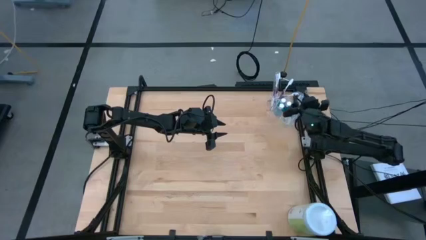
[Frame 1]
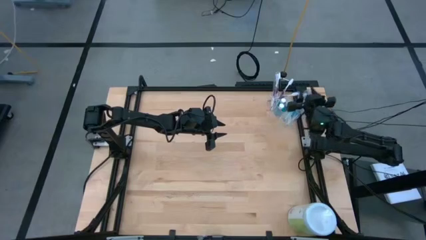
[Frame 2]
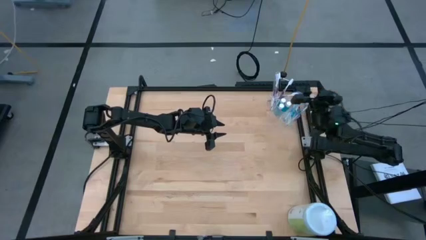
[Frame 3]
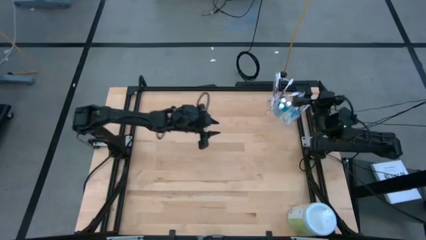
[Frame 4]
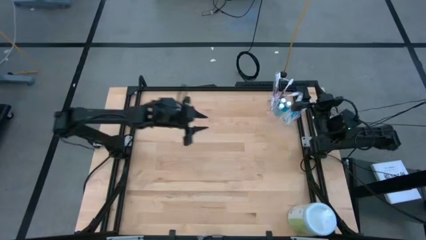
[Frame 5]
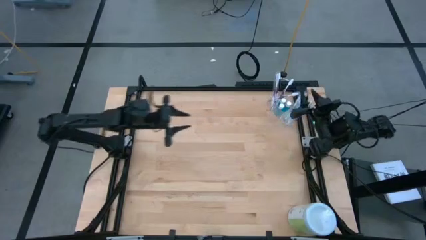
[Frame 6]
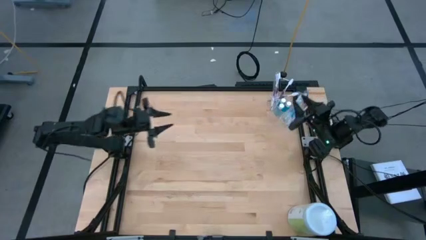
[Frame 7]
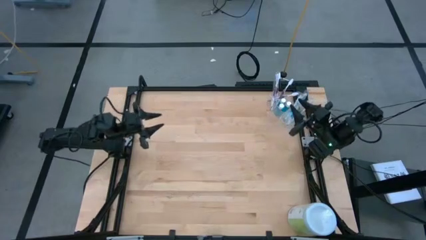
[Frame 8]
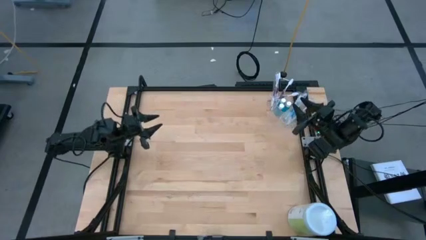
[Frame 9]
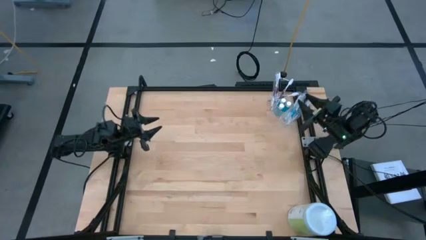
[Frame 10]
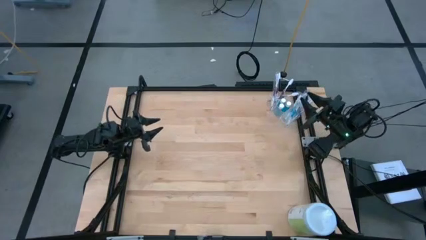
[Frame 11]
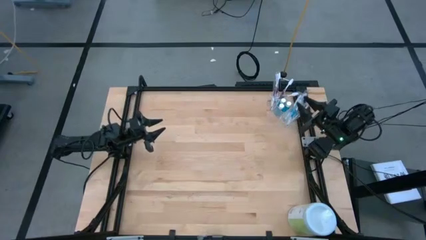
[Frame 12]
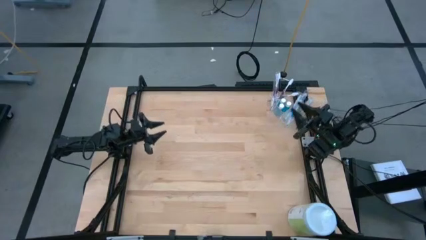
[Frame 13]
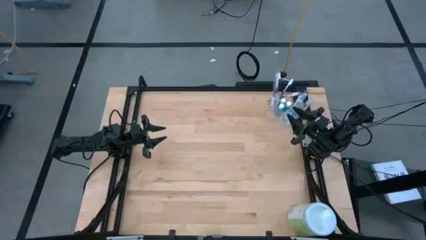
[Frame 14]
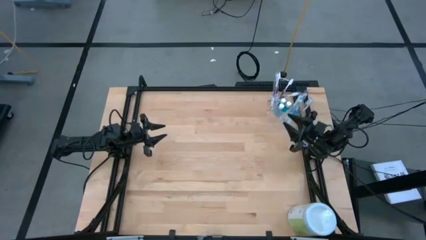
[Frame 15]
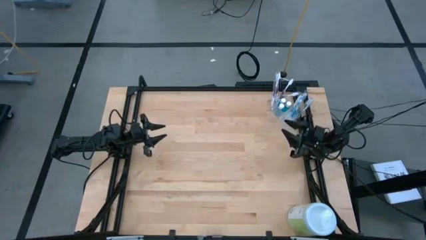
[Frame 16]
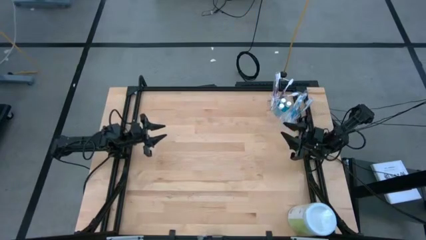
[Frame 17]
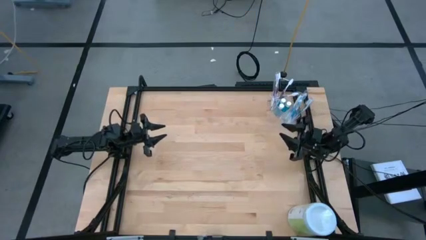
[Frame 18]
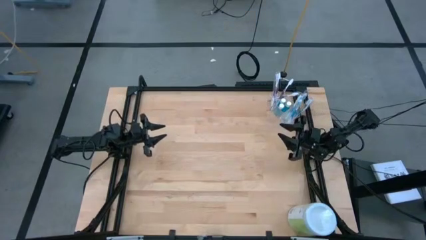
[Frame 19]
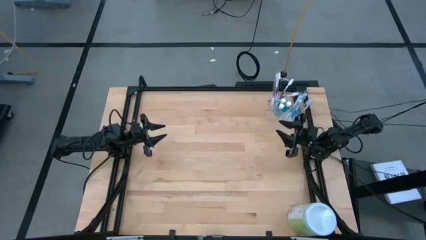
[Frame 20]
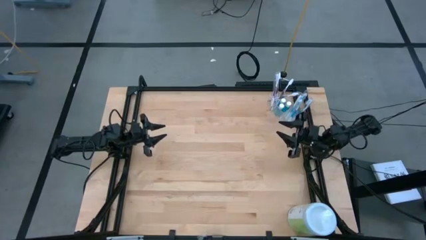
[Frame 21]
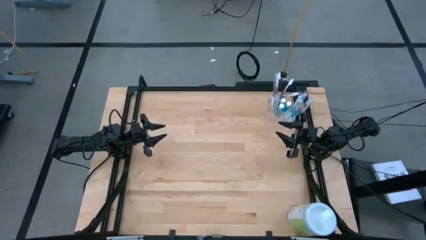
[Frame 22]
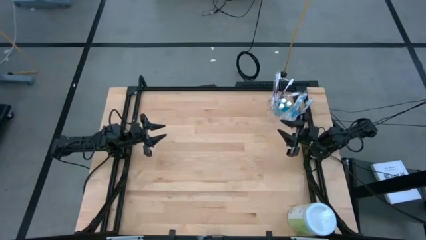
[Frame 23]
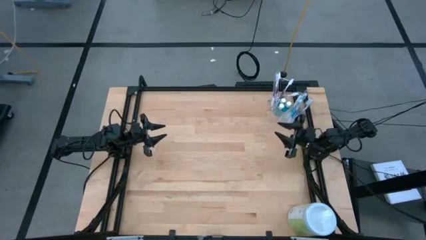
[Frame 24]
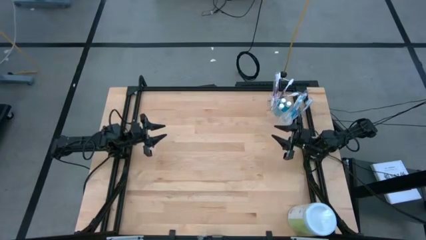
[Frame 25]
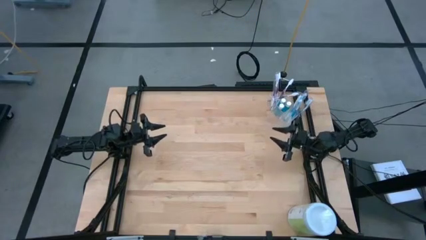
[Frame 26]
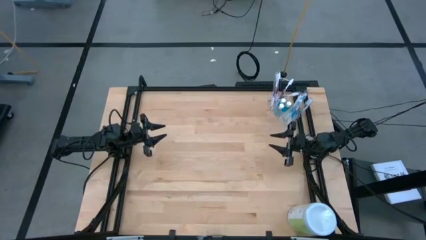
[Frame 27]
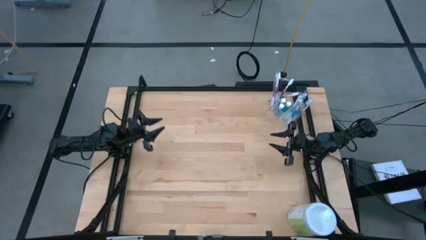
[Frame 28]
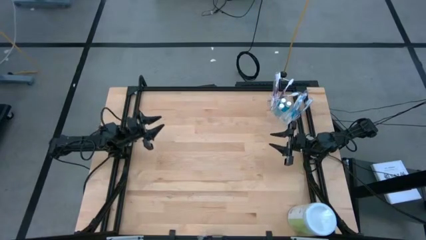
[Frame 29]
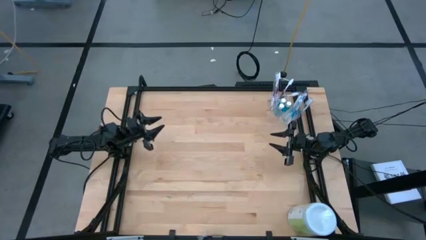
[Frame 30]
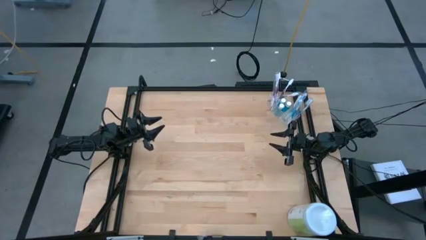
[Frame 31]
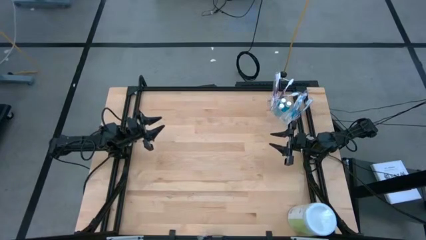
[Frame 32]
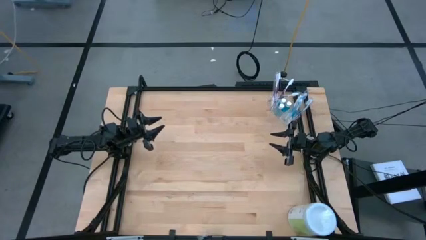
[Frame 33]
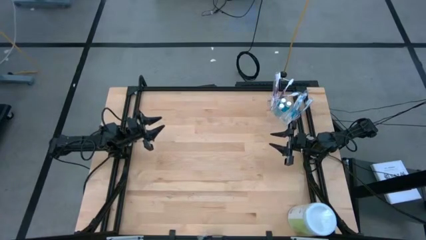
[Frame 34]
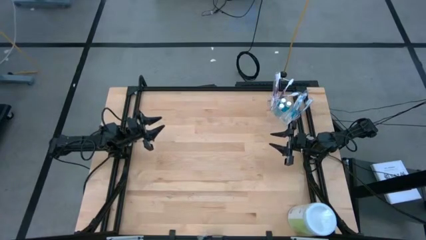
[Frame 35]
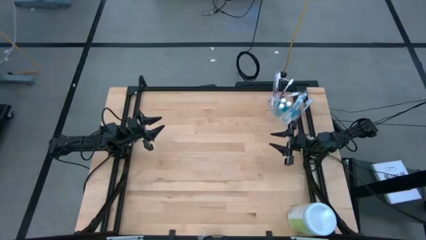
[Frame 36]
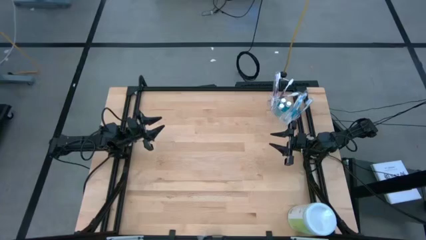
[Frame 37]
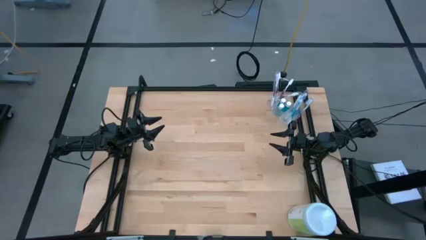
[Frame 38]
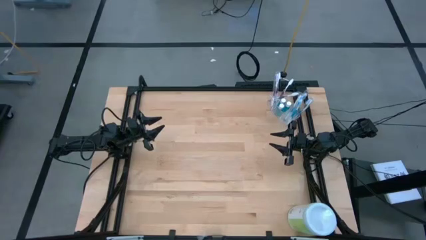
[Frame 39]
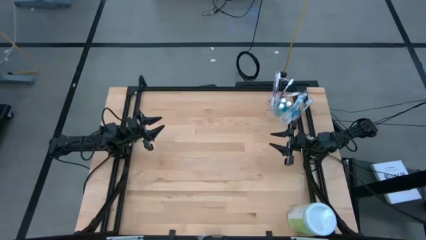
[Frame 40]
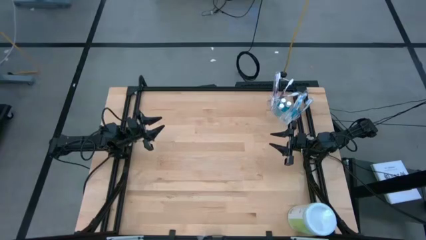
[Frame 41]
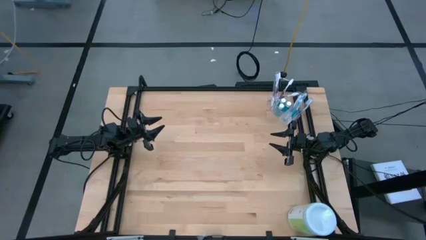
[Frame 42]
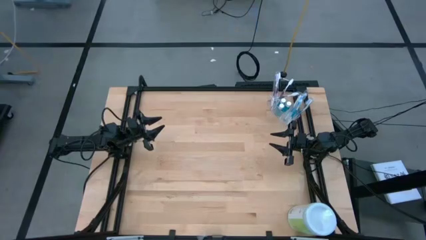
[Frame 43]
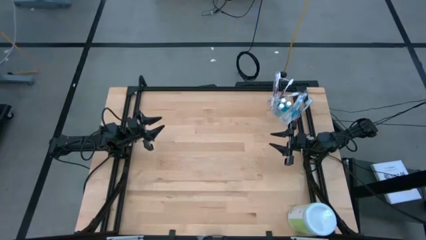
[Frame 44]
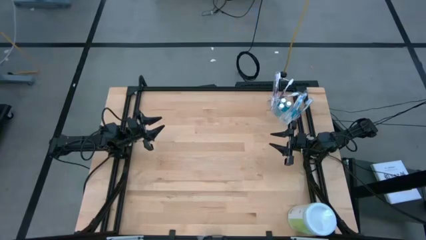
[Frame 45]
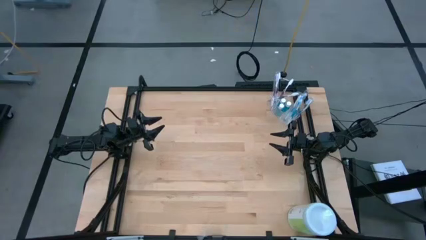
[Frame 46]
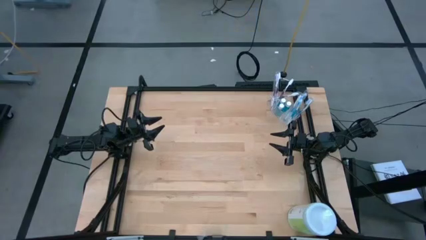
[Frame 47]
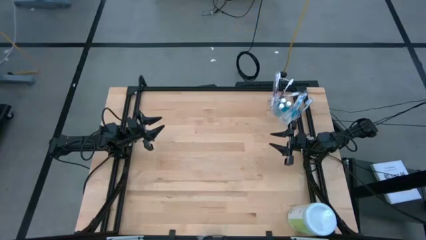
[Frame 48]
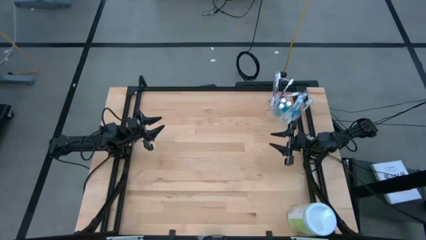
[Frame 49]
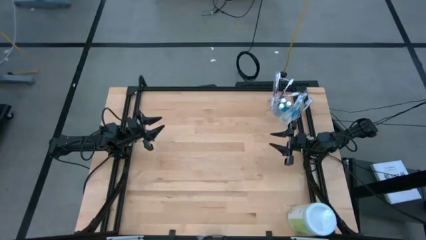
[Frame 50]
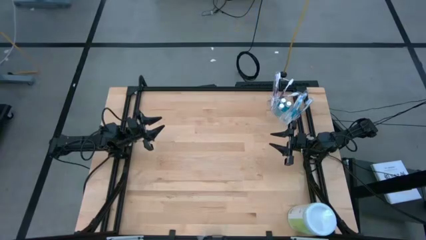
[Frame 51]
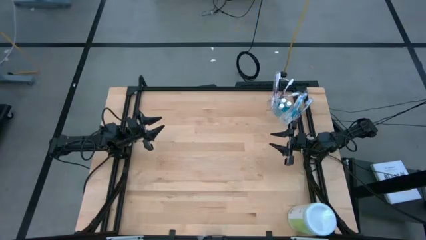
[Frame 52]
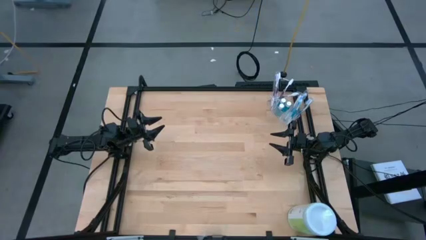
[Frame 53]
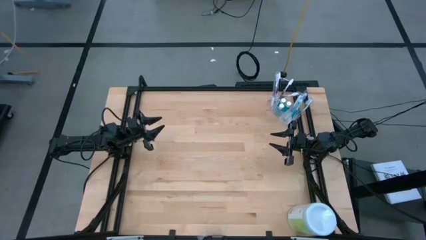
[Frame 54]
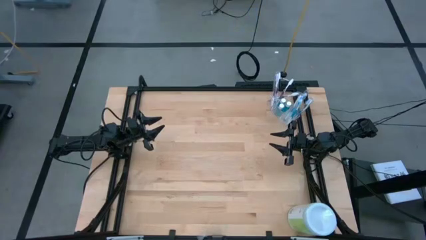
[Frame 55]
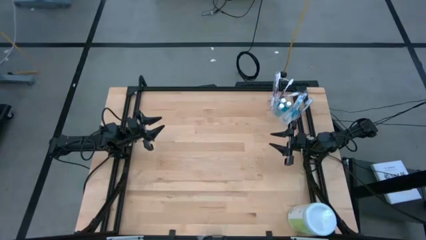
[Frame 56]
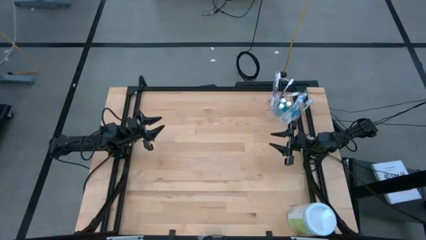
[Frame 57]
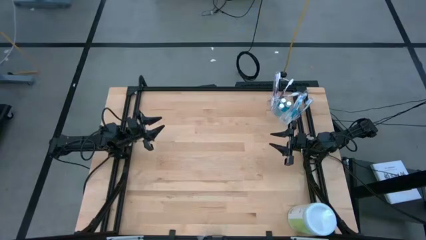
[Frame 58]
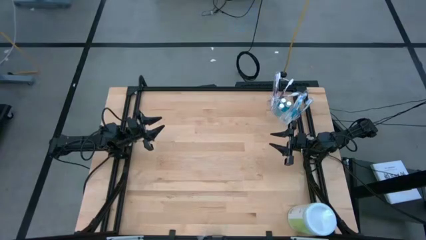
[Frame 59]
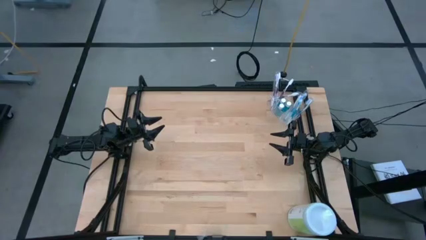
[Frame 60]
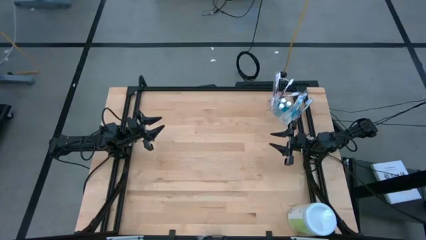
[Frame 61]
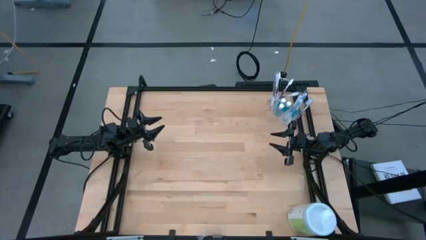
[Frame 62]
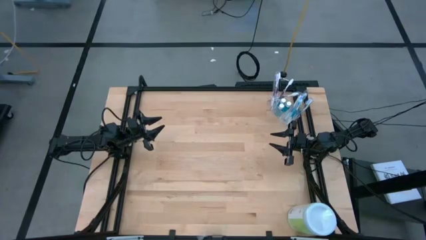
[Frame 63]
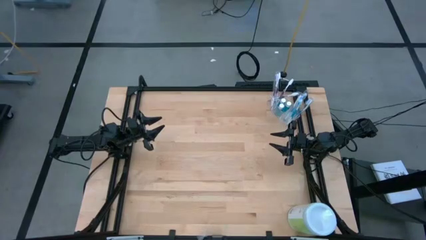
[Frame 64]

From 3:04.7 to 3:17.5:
Task: Pick & Place toothbrushing station
Return to Home Position
